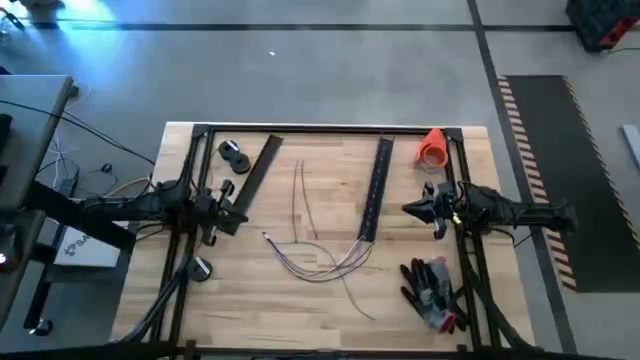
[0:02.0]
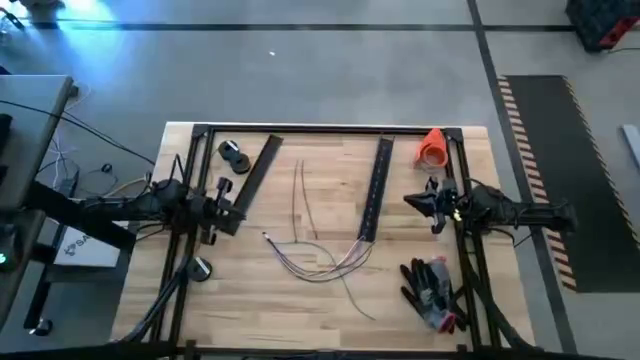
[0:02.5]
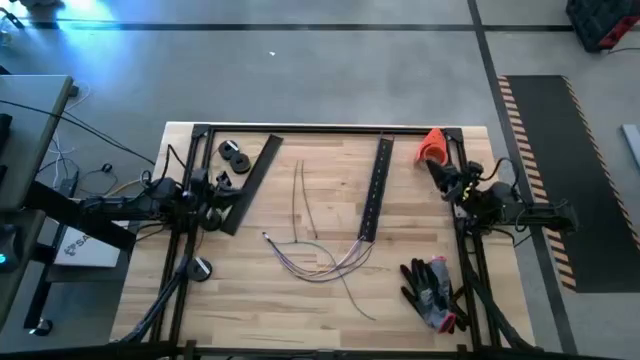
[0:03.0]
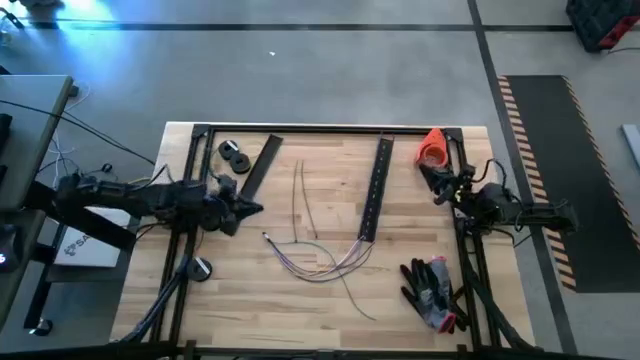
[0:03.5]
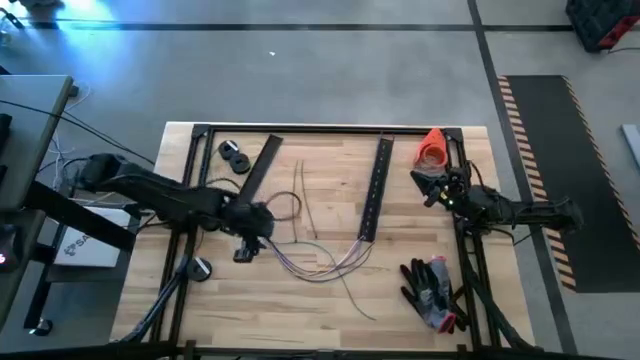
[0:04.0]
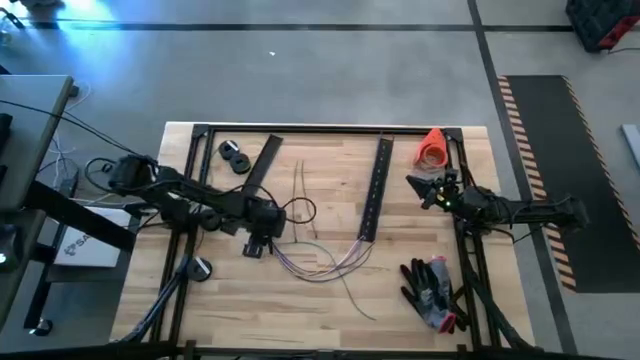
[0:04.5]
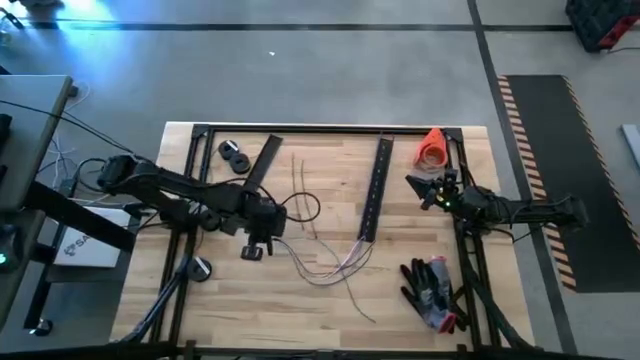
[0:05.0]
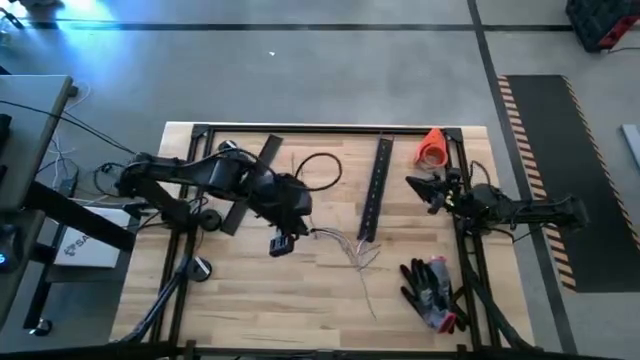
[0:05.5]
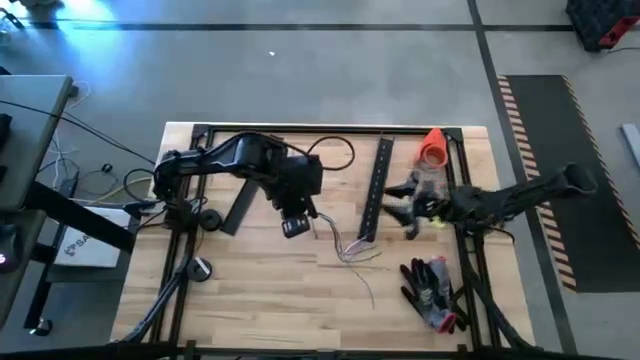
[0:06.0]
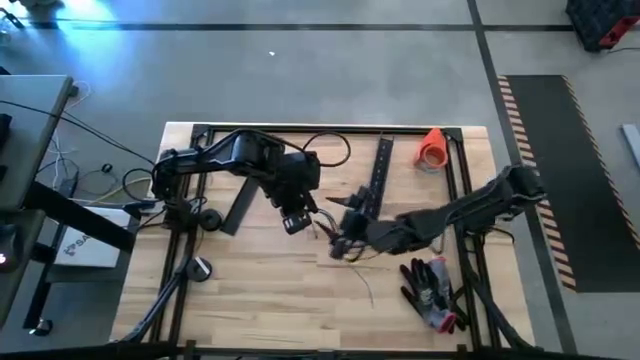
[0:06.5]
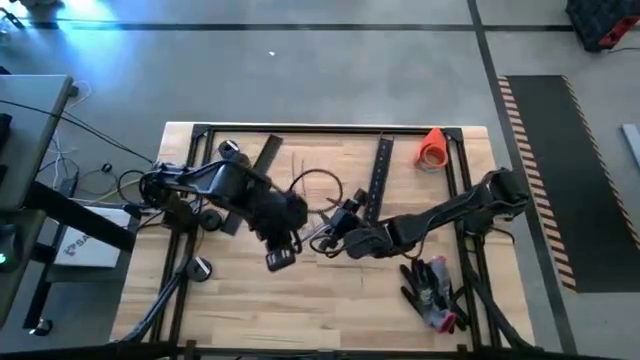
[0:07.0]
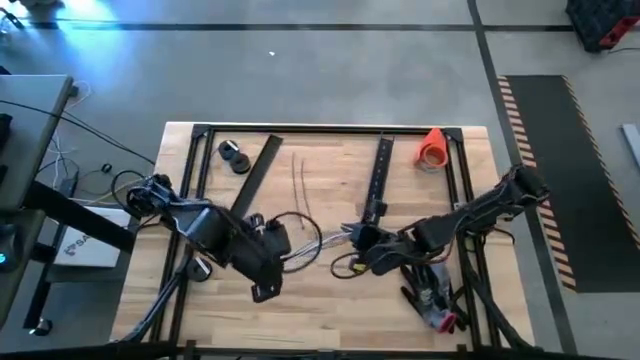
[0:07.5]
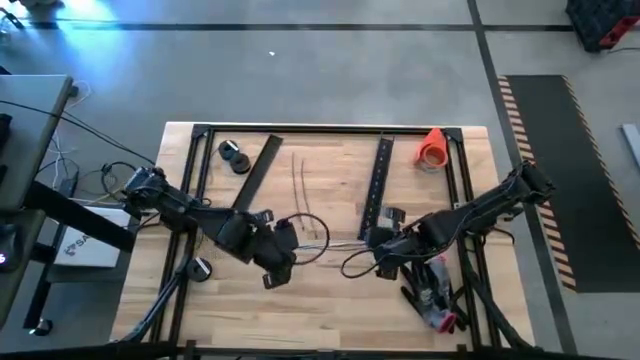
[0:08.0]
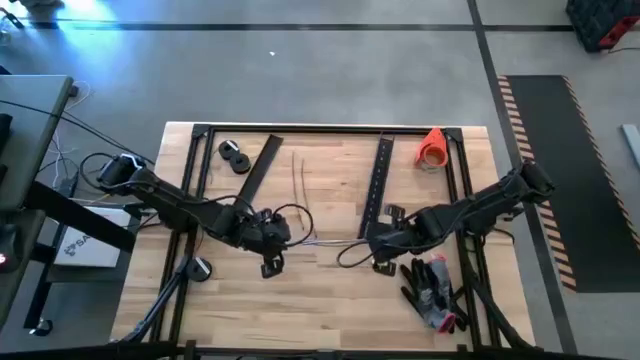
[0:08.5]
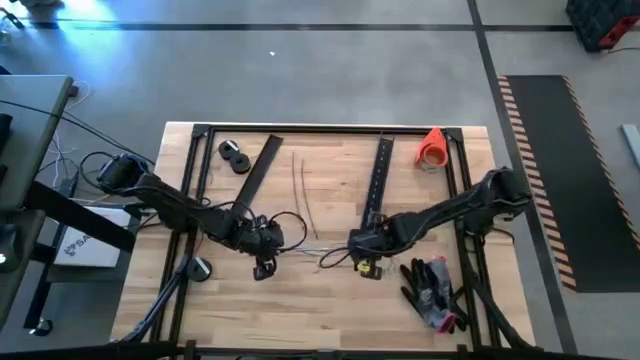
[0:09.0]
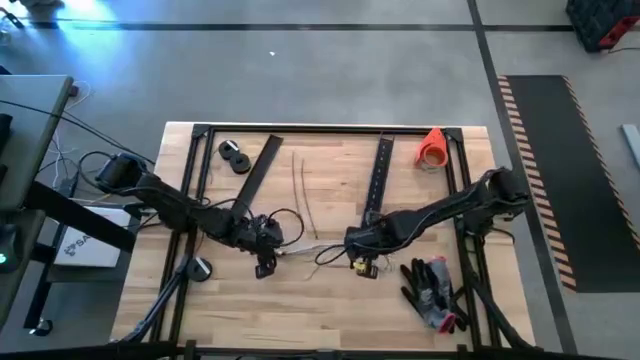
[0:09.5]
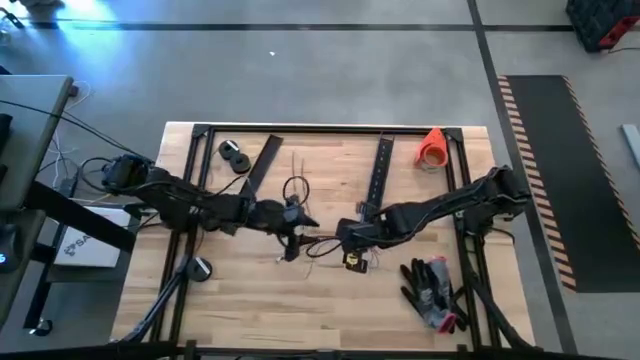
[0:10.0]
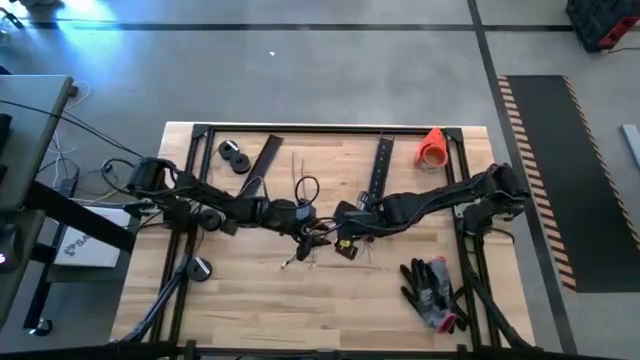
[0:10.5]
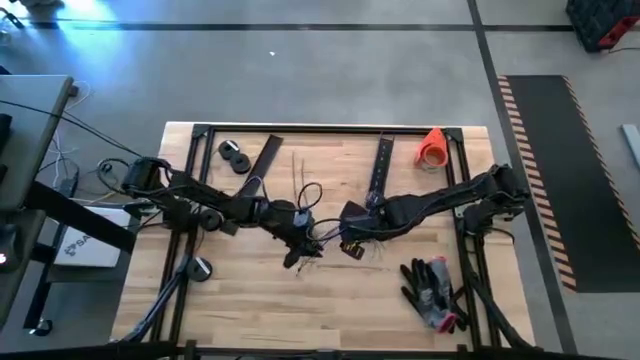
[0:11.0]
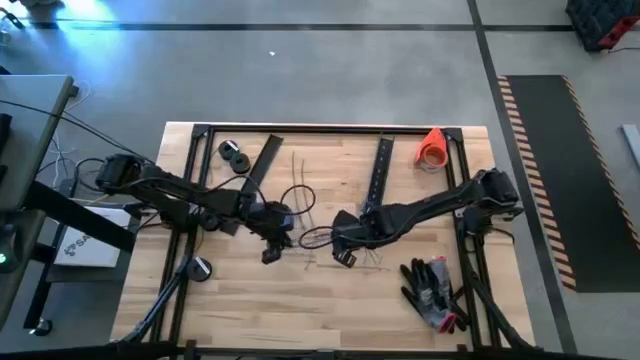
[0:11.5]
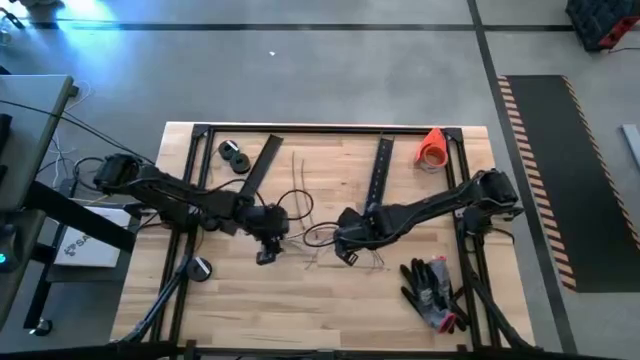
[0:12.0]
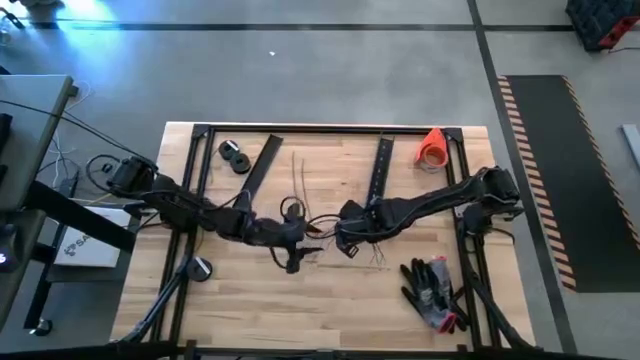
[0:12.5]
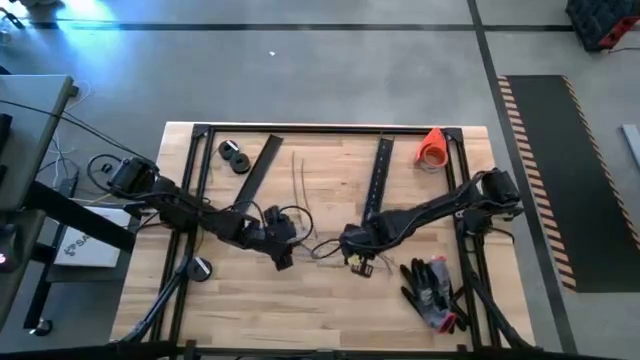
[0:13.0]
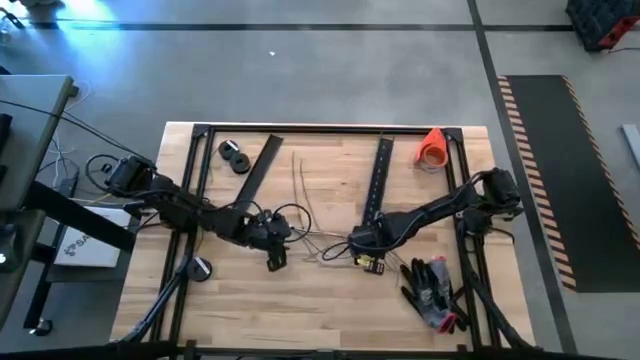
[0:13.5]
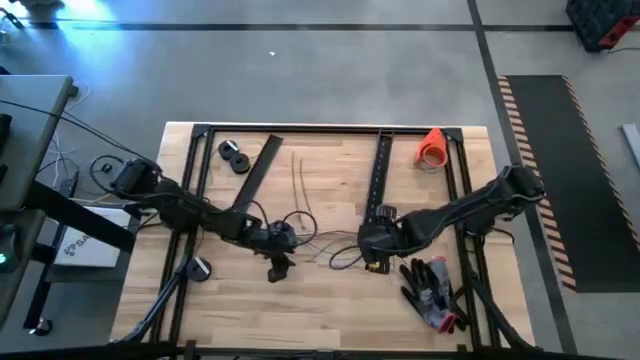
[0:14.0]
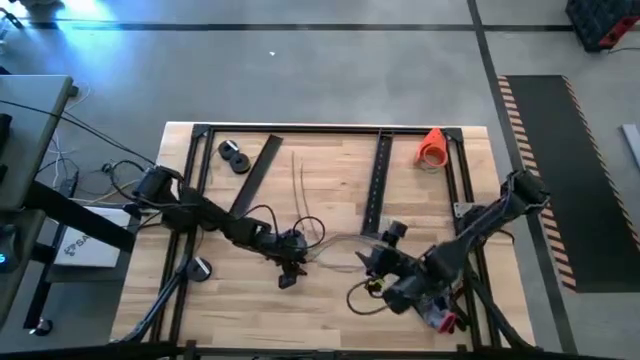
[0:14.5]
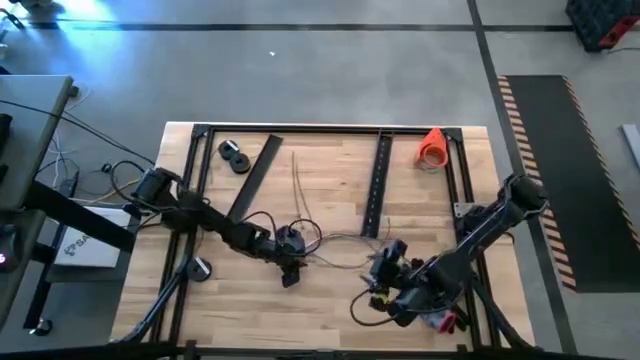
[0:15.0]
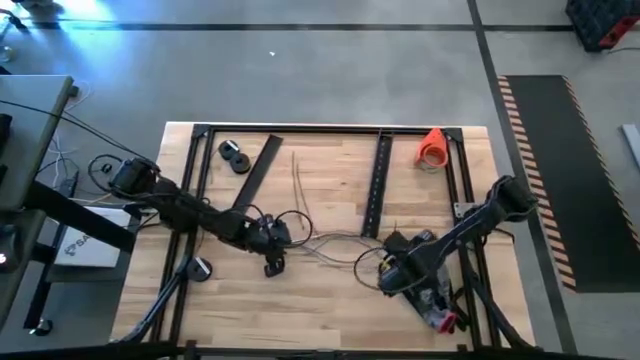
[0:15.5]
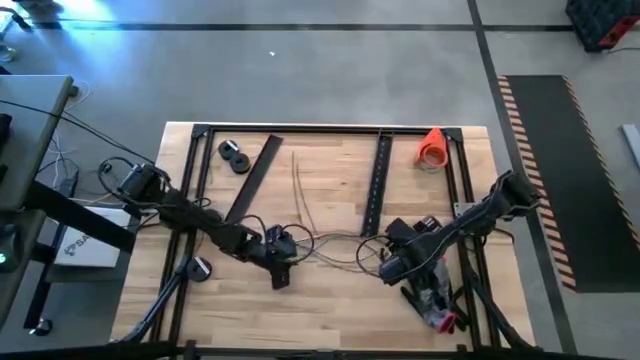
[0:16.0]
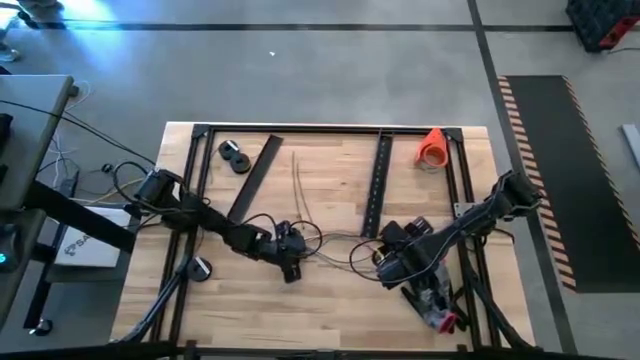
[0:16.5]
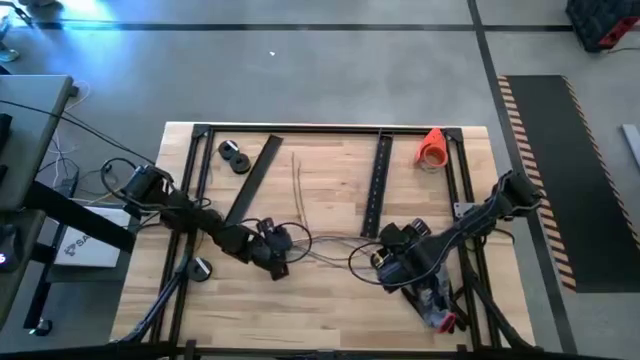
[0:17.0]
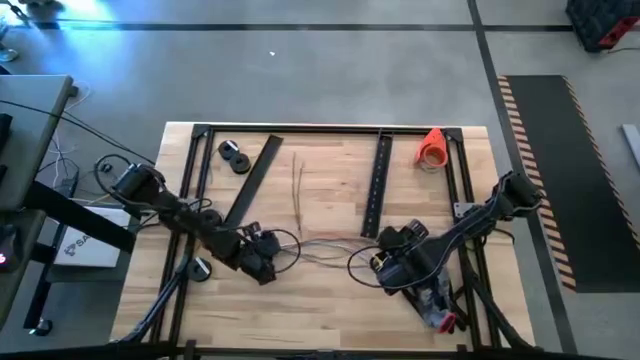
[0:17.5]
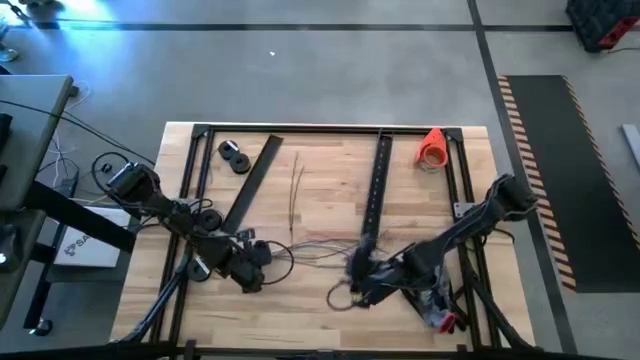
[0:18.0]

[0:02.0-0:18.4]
Task: Ziptie cables
Prepare the cables

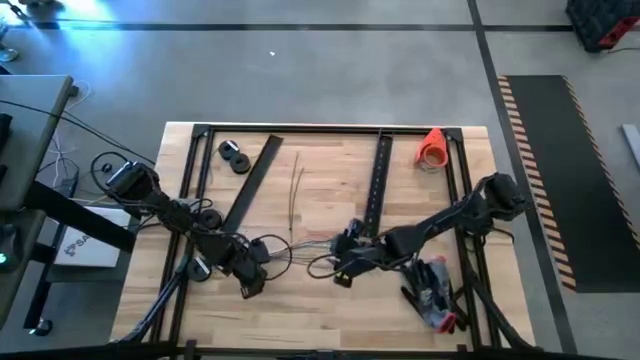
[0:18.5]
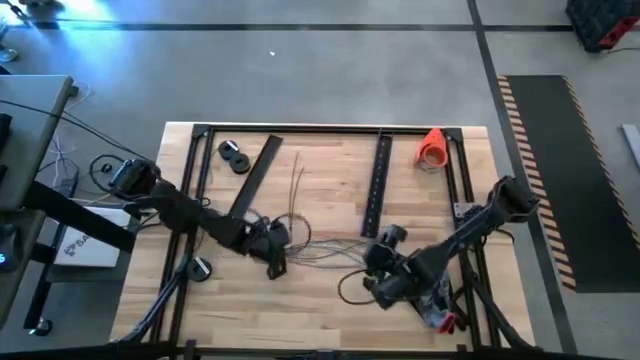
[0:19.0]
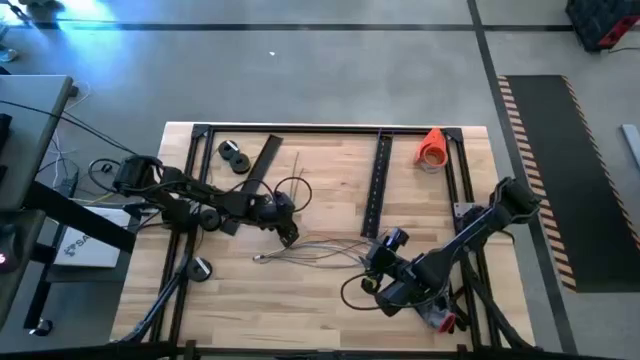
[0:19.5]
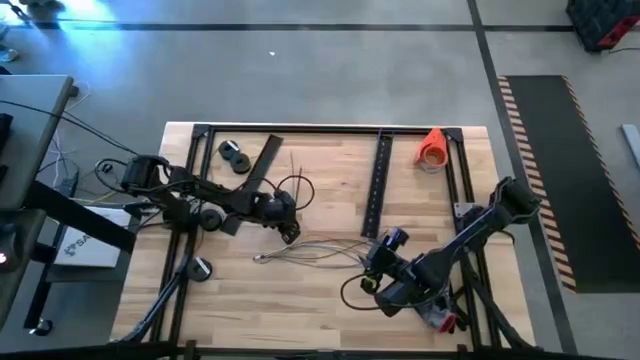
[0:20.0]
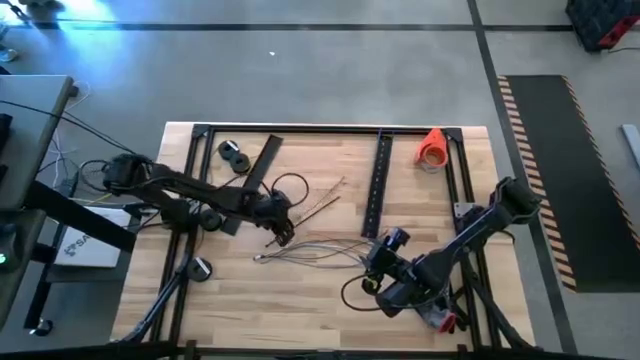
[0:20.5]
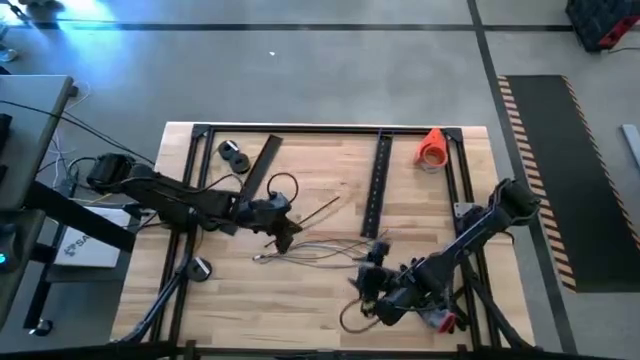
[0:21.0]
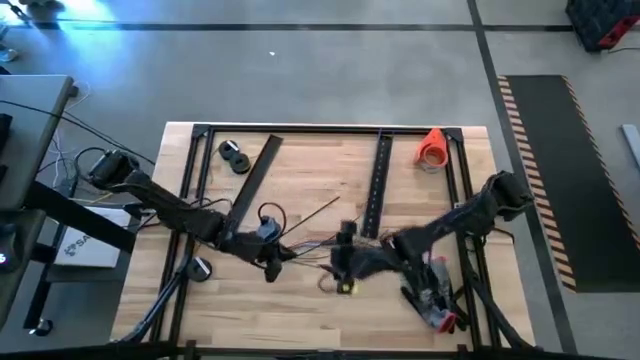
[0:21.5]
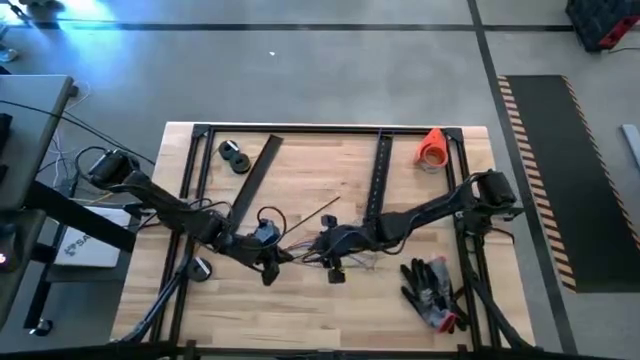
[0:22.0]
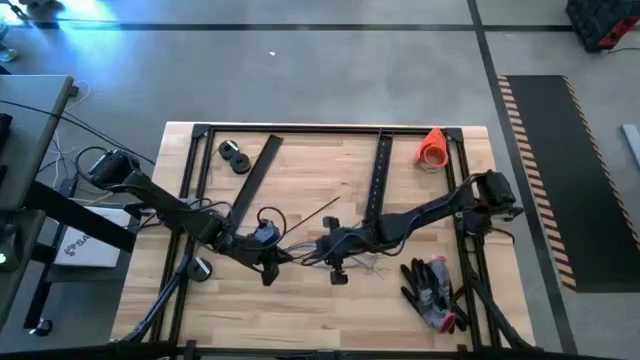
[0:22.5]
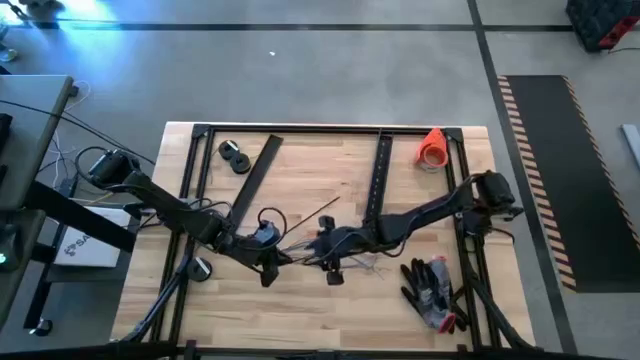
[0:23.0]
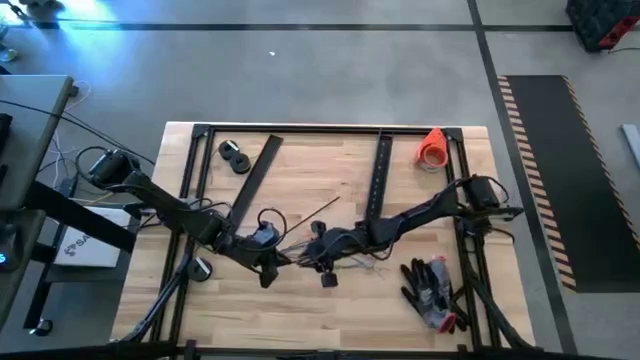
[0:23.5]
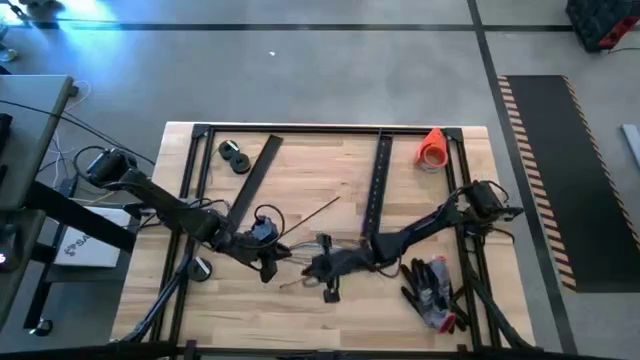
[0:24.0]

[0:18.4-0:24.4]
Wrap the left black zip tie on the cables
